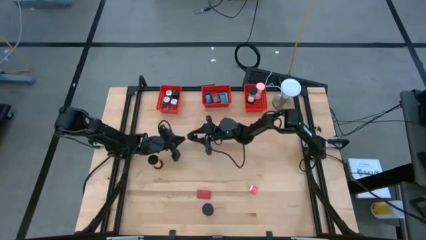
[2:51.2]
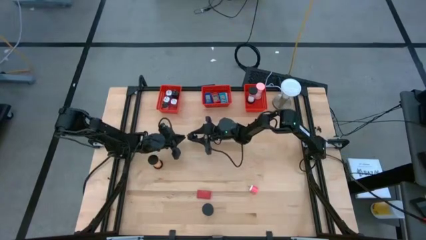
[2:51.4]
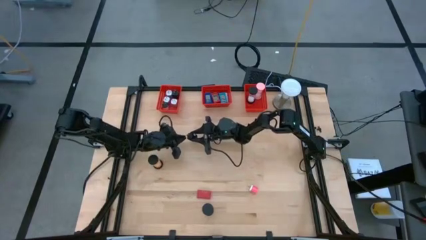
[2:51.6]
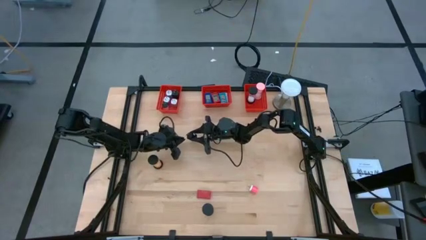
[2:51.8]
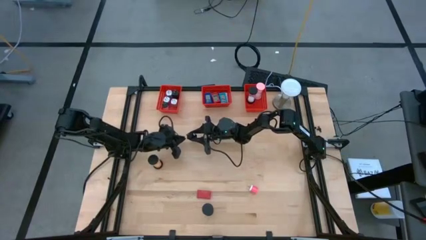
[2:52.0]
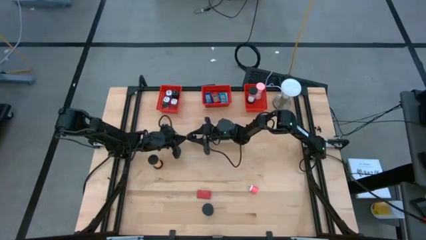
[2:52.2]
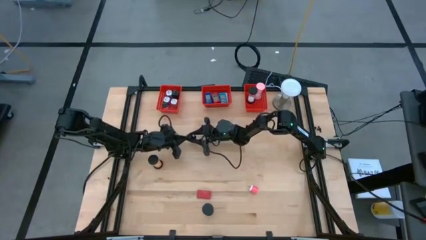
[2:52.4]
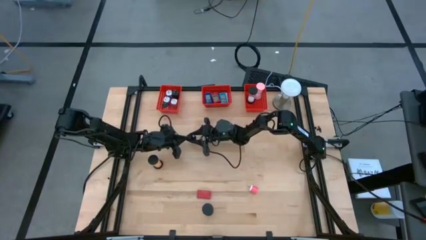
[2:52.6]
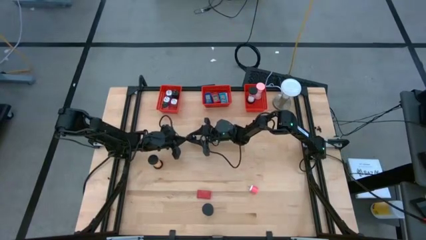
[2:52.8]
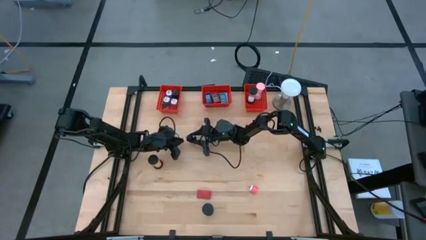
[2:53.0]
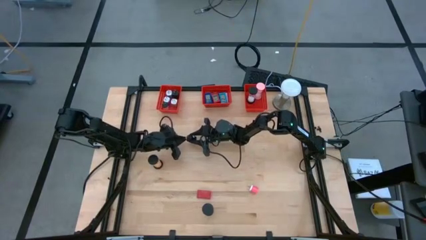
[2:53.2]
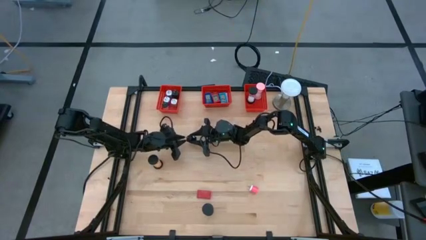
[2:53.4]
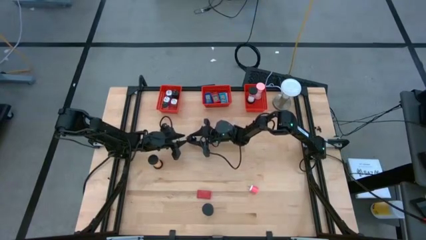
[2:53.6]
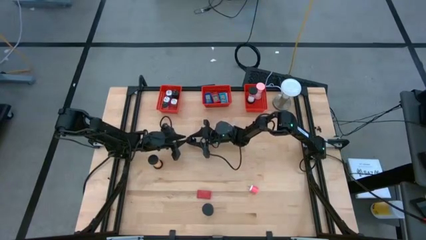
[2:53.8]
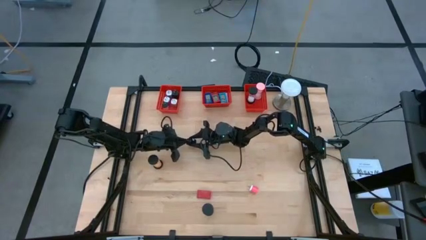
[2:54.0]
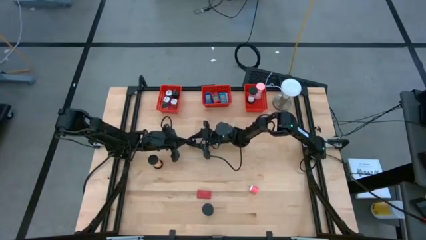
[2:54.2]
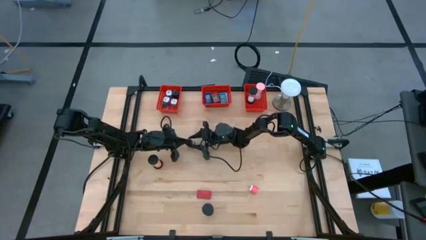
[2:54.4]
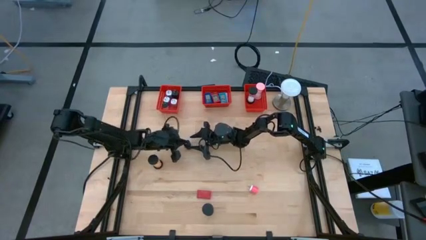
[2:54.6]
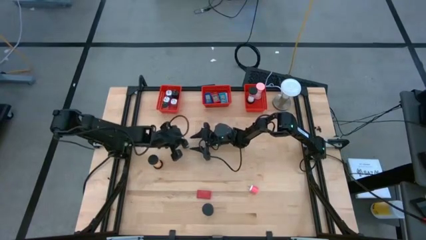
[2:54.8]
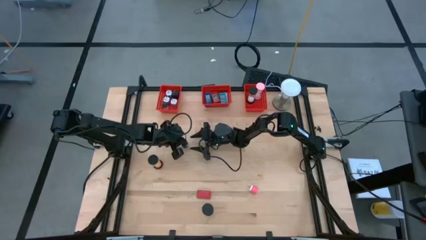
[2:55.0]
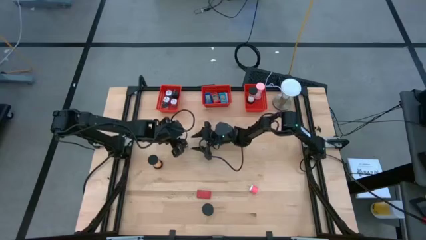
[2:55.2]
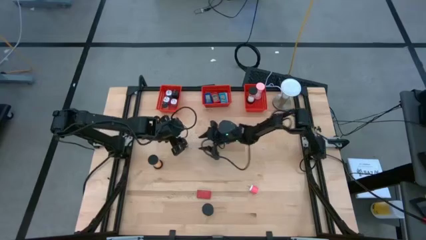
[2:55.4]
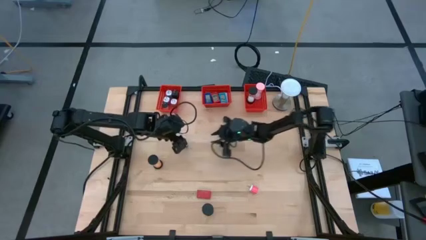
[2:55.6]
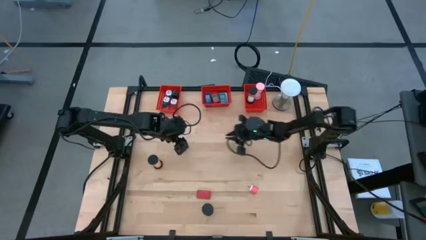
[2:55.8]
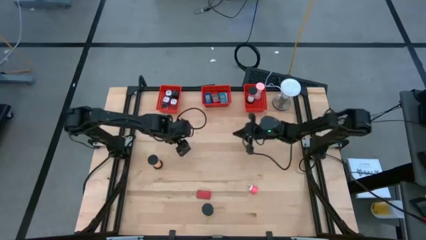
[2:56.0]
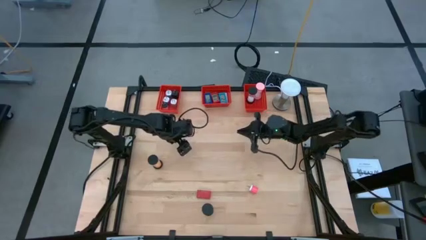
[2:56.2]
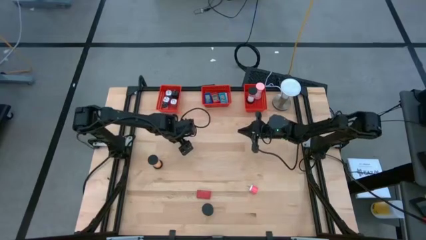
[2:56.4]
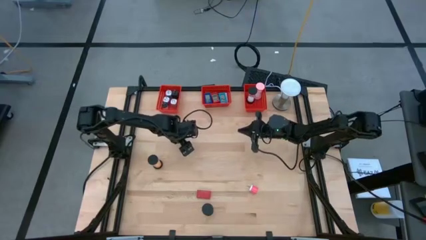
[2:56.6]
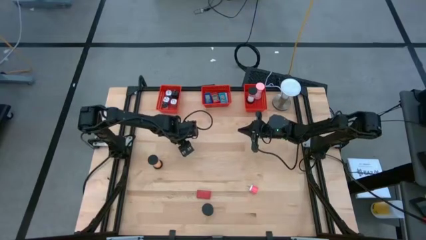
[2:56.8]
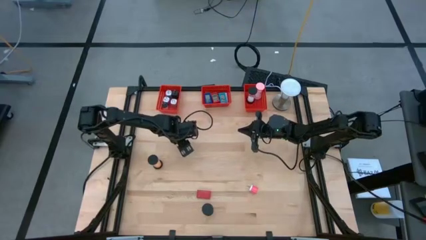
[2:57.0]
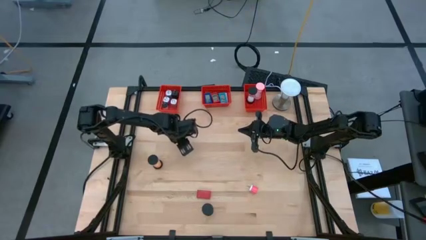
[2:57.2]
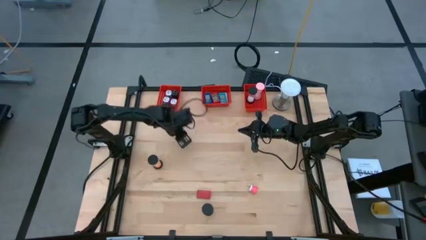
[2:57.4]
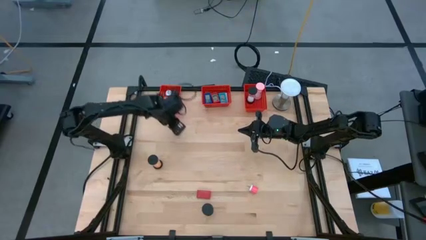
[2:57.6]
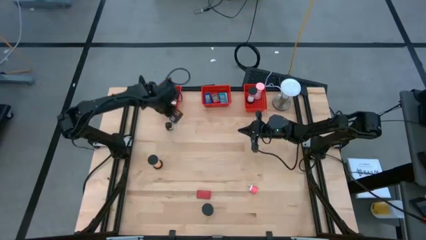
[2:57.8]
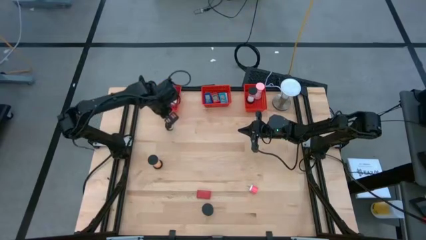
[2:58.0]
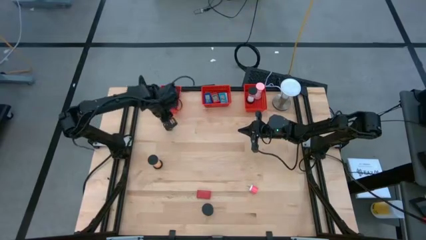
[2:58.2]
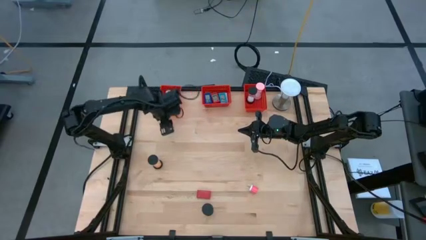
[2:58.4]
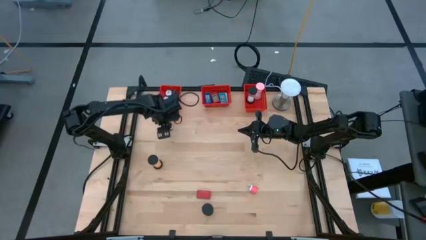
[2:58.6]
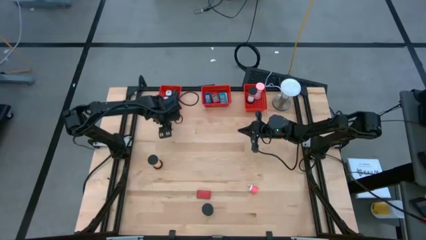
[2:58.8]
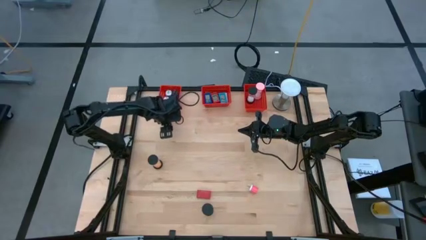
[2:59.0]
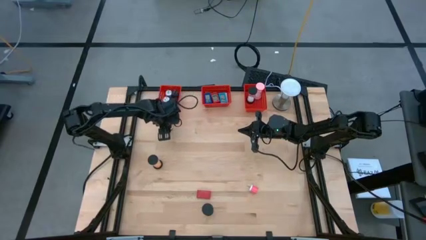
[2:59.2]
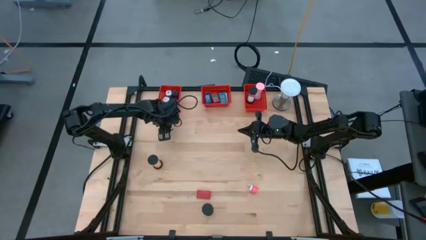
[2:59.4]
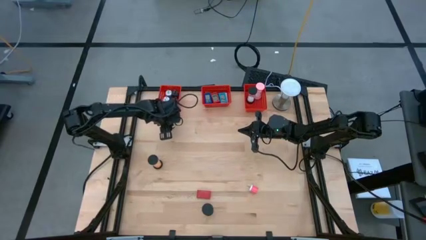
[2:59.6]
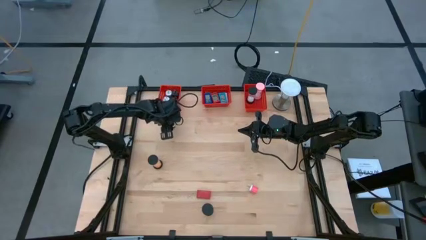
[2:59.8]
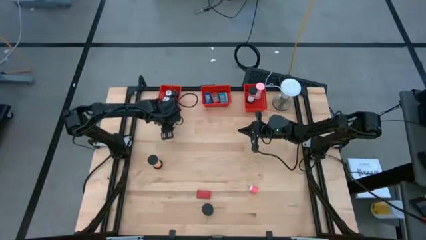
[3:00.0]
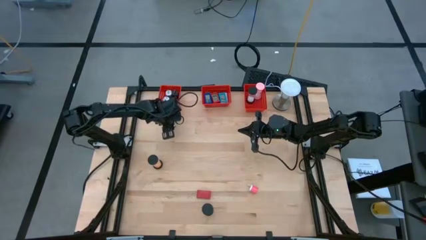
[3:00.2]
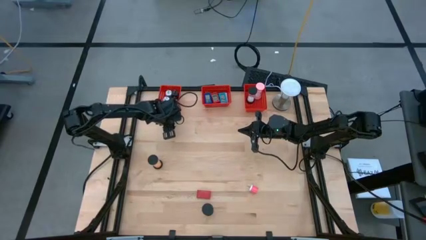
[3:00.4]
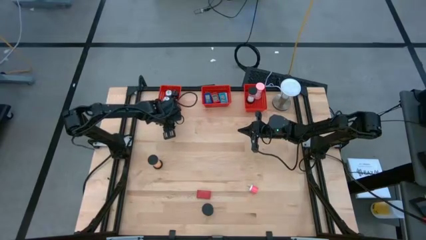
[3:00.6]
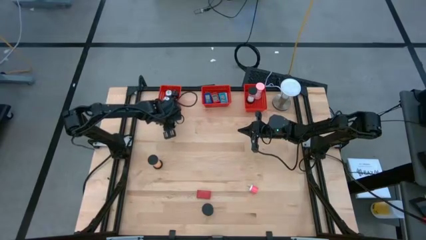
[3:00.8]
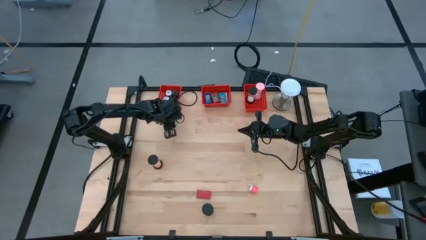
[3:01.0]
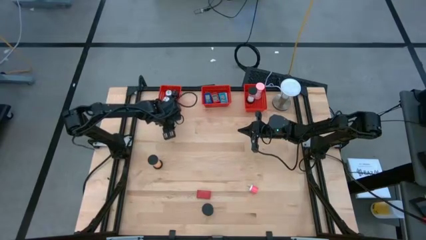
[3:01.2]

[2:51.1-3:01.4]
Task: Pick & Place Office items
Put the black charger adapter into the left red bin

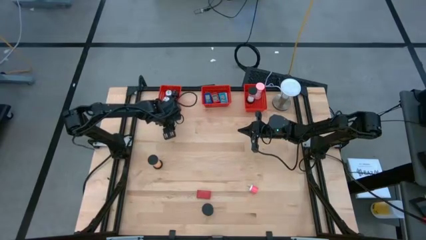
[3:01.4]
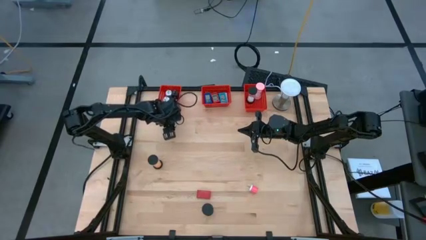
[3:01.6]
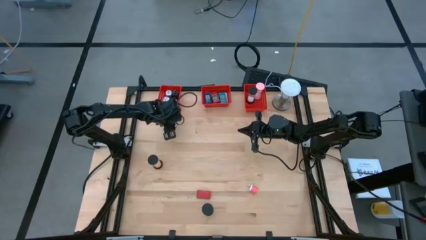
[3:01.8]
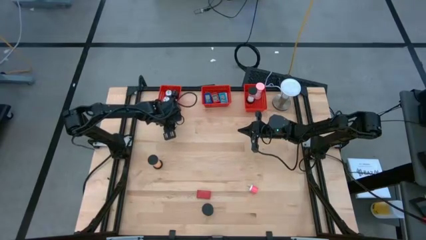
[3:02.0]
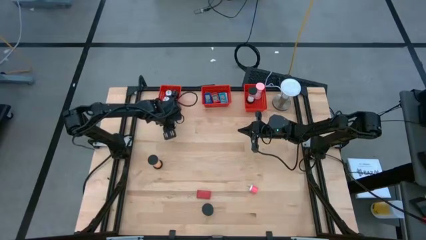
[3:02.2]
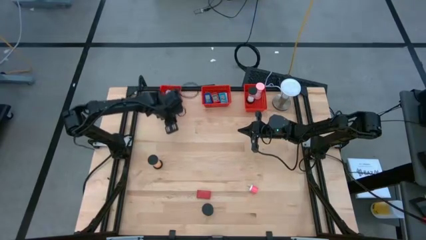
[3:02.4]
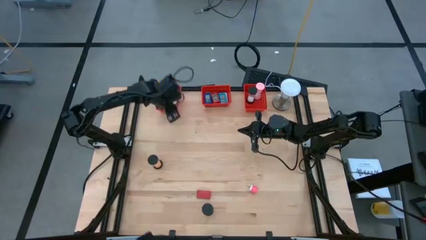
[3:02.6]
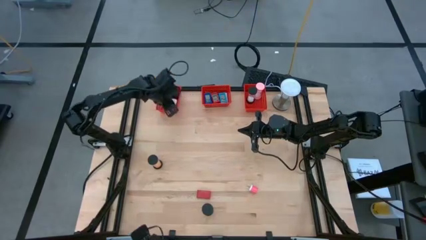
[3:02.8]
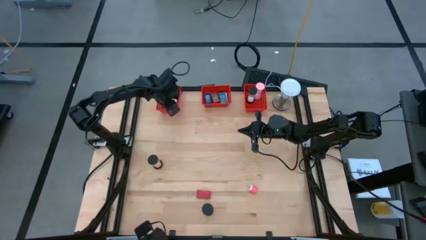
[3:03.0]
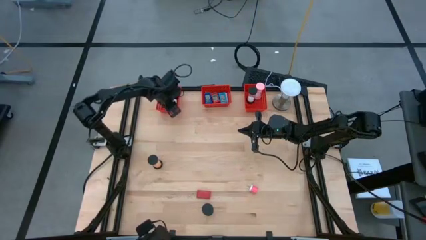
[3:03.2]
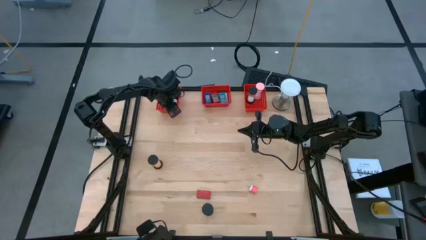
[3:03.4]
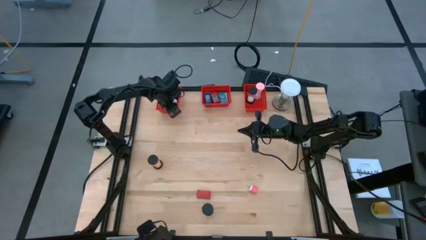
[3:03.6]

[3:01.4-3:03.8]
Put the black charger adapter into the left red bin
